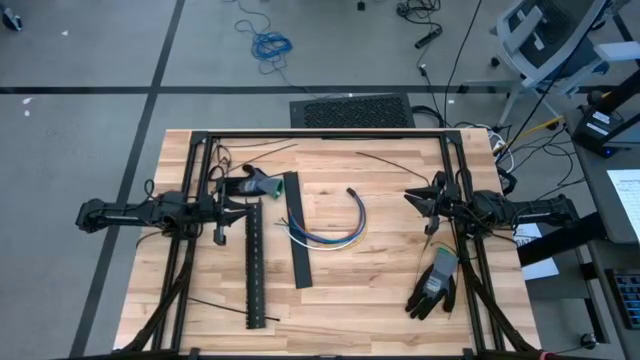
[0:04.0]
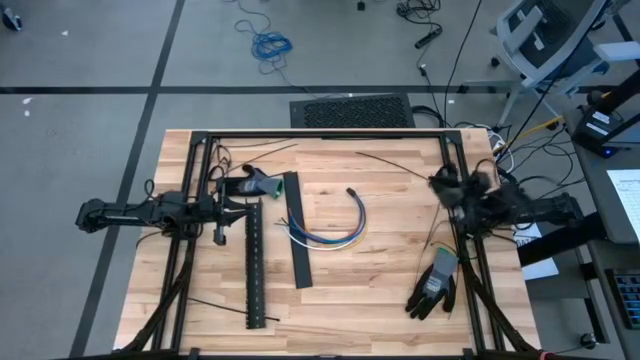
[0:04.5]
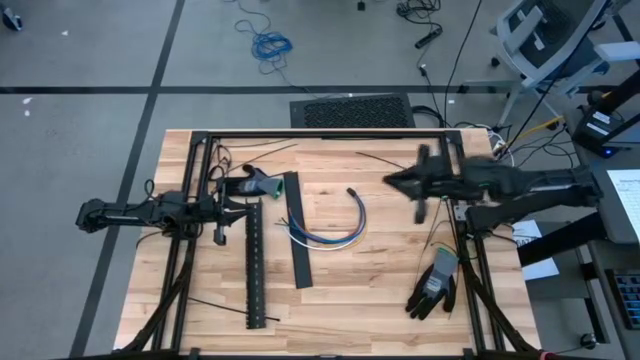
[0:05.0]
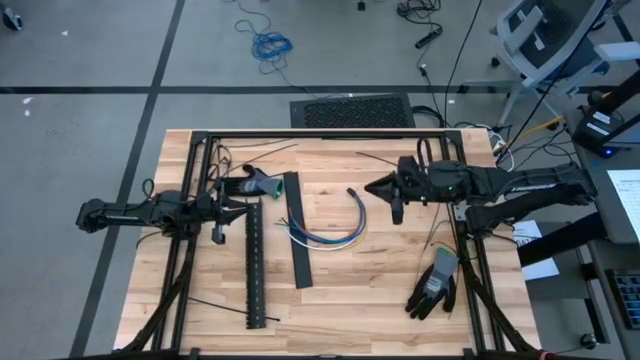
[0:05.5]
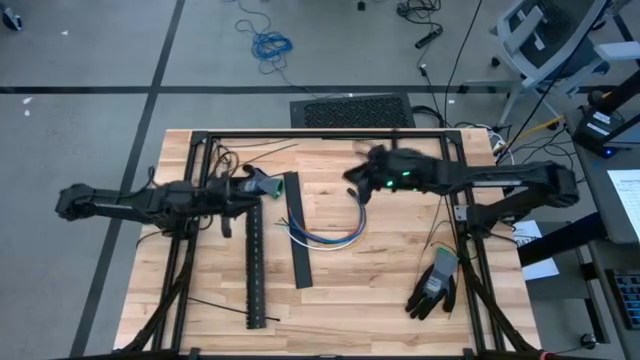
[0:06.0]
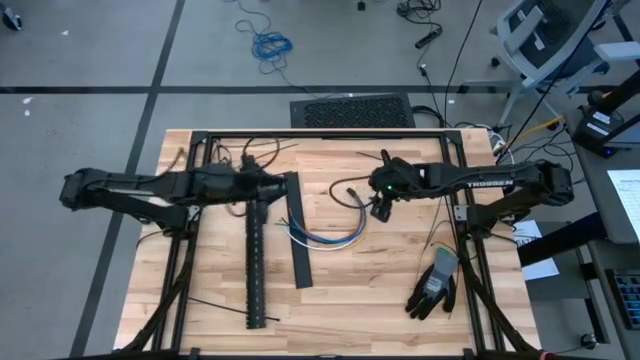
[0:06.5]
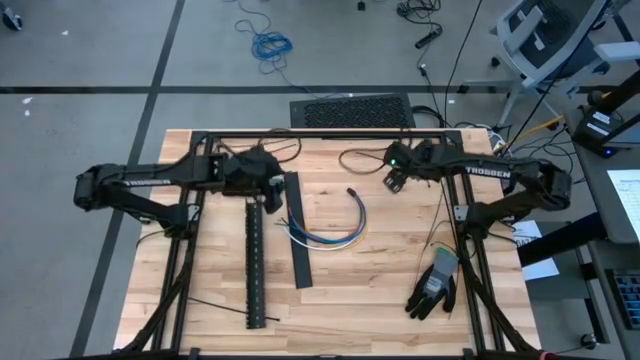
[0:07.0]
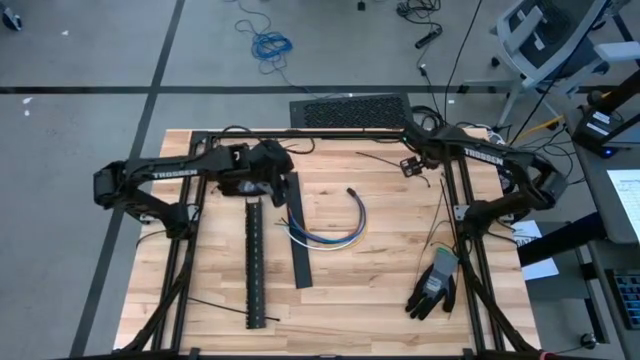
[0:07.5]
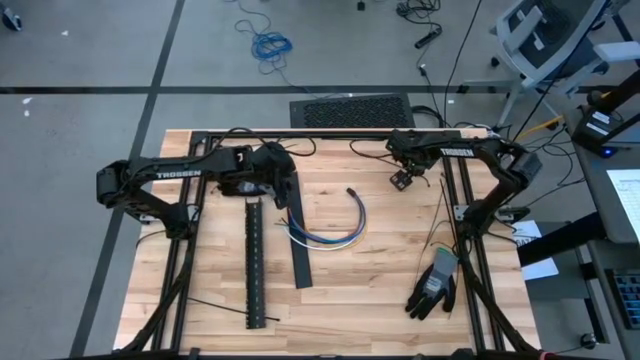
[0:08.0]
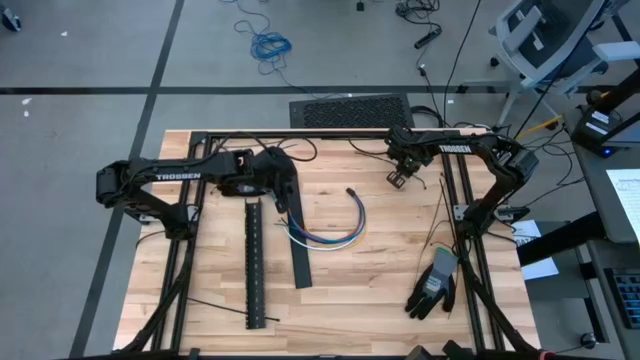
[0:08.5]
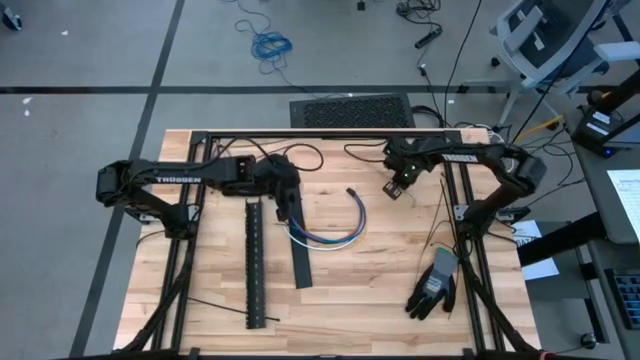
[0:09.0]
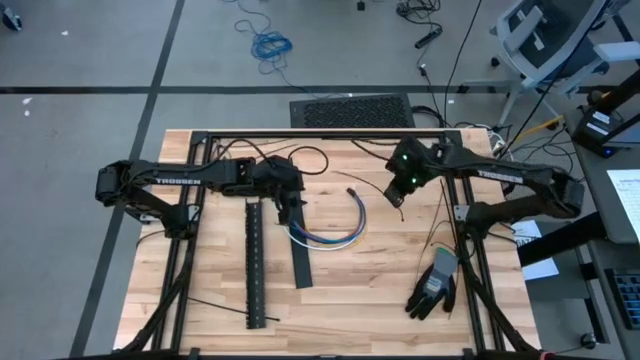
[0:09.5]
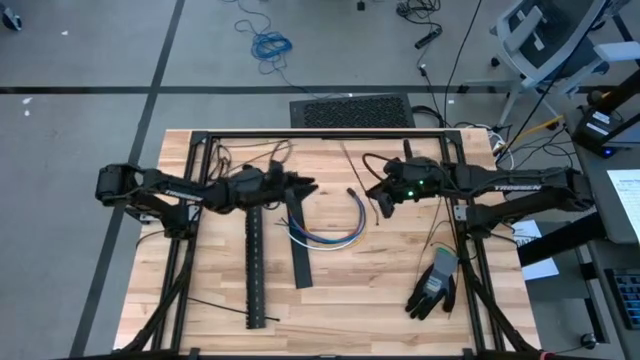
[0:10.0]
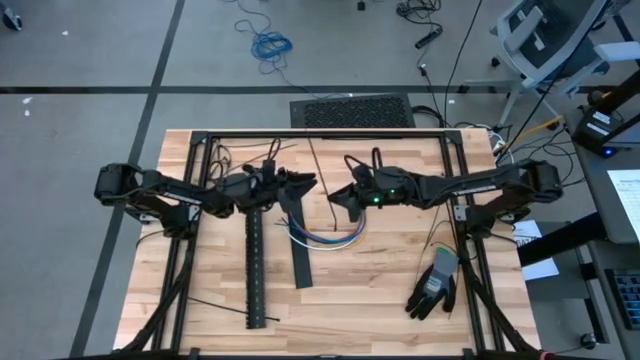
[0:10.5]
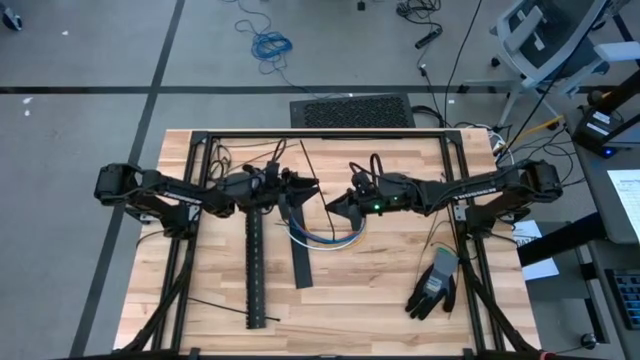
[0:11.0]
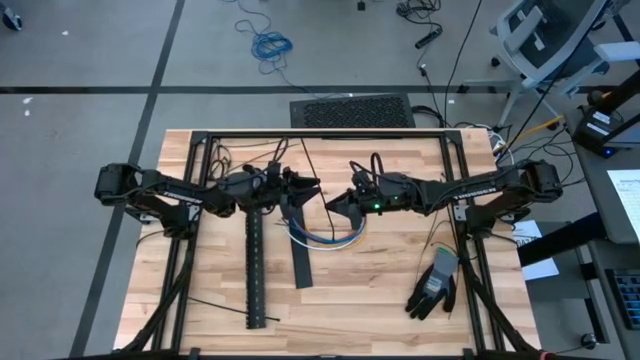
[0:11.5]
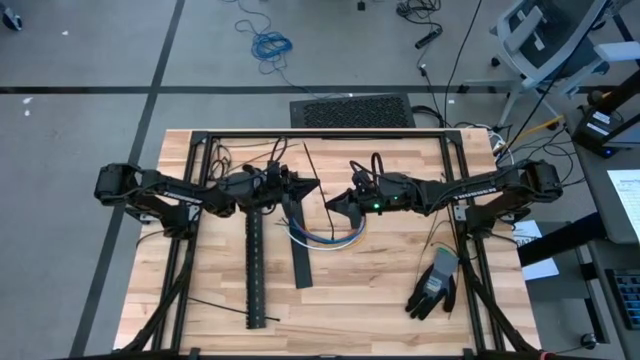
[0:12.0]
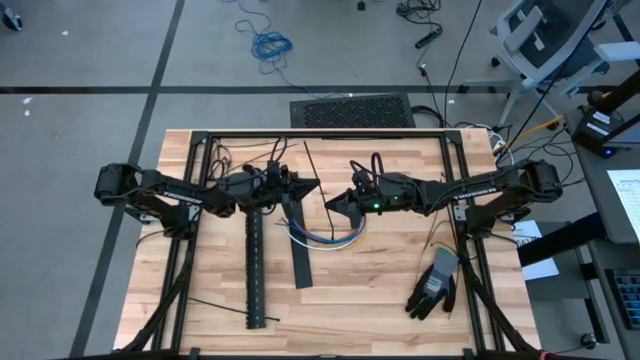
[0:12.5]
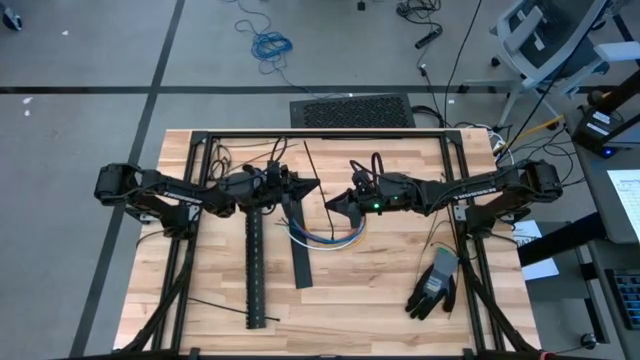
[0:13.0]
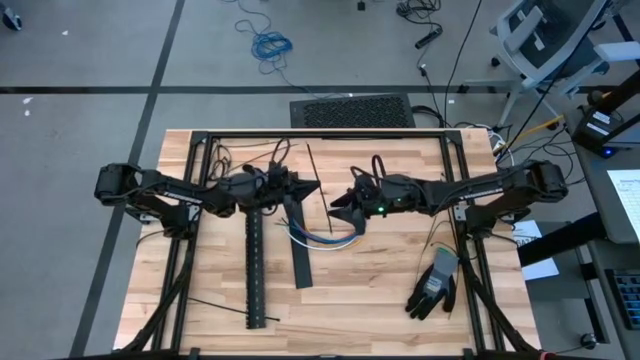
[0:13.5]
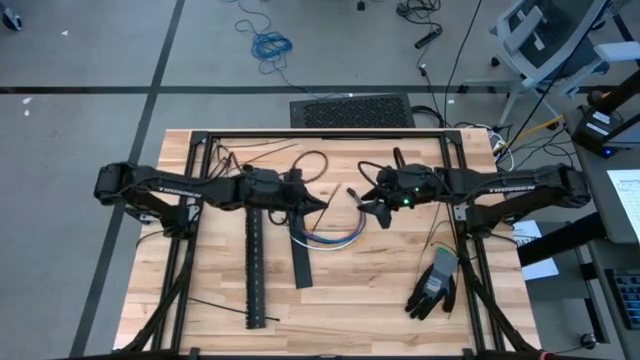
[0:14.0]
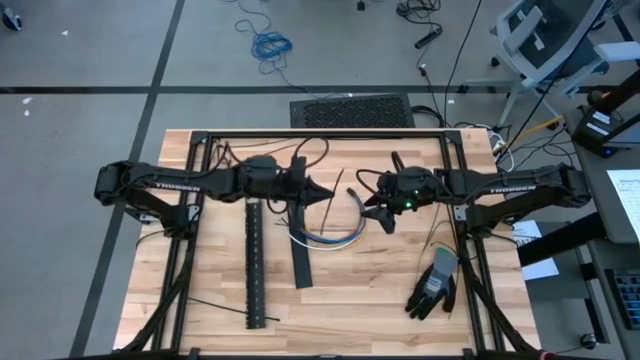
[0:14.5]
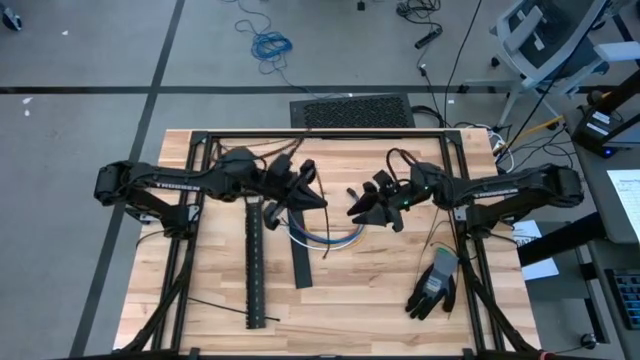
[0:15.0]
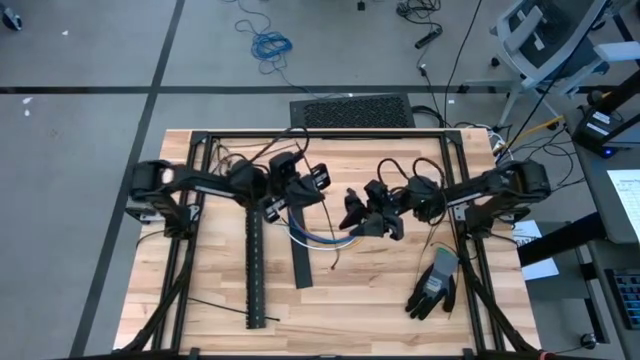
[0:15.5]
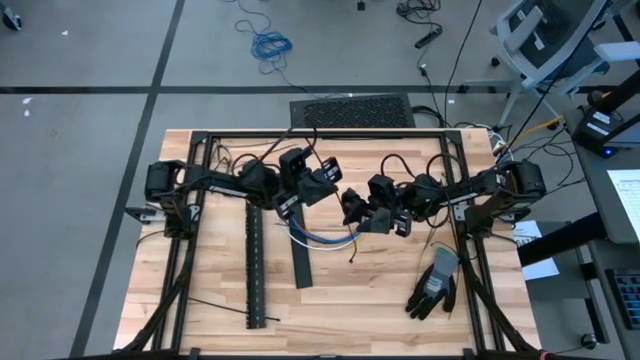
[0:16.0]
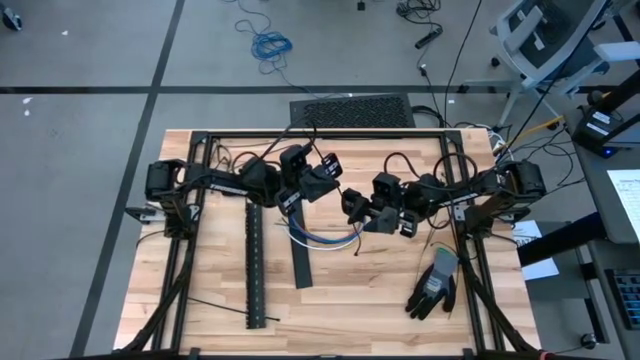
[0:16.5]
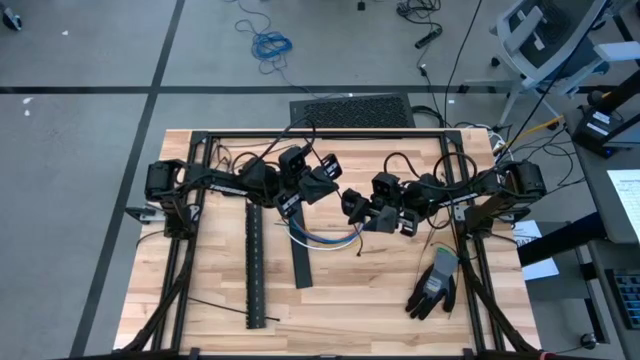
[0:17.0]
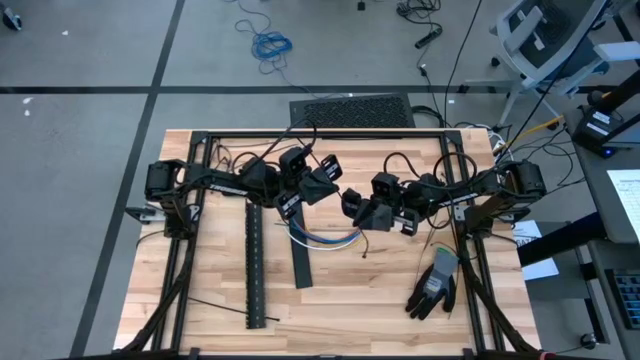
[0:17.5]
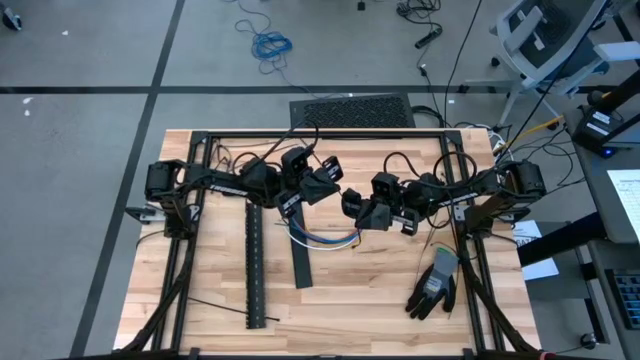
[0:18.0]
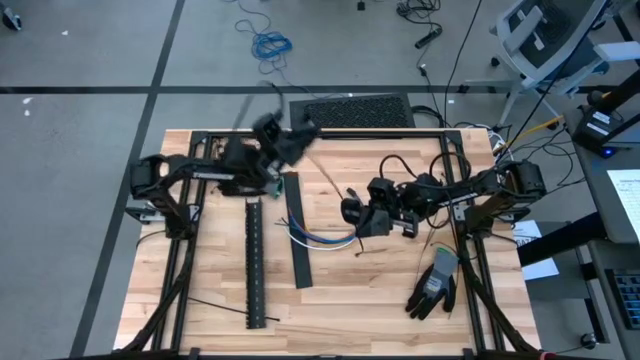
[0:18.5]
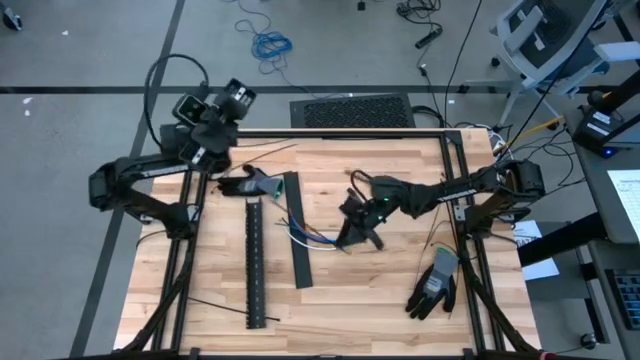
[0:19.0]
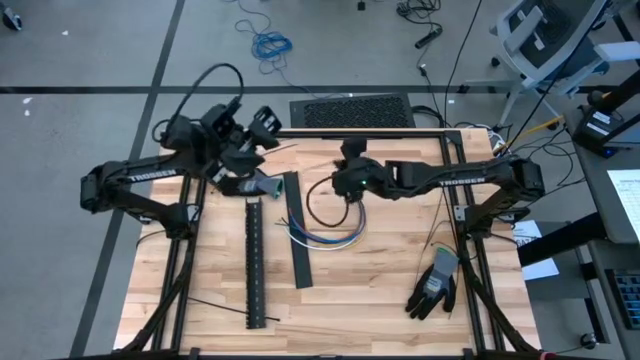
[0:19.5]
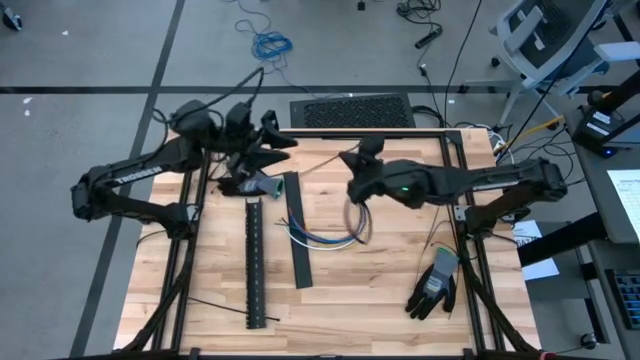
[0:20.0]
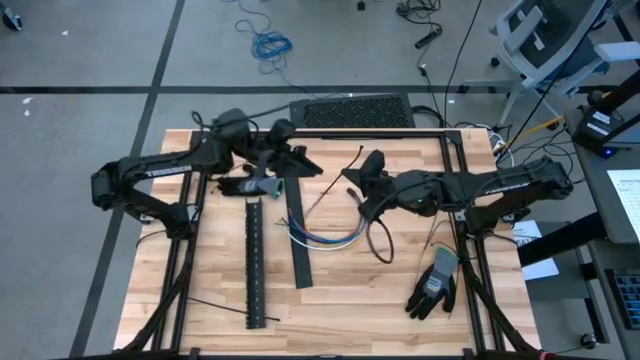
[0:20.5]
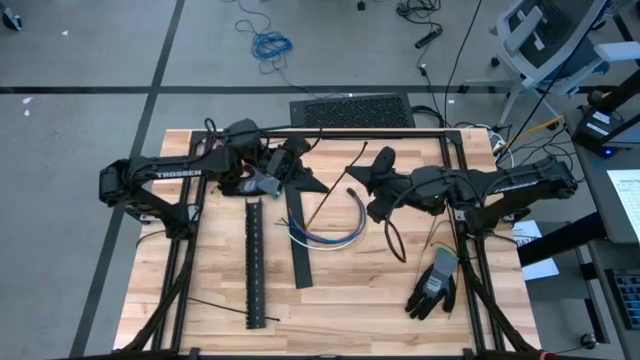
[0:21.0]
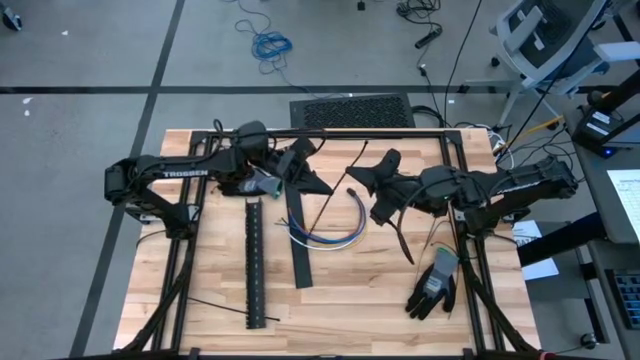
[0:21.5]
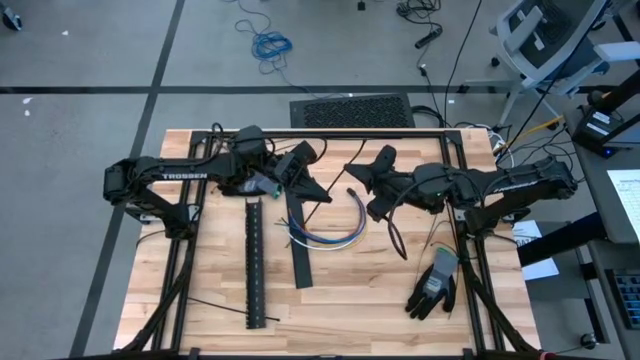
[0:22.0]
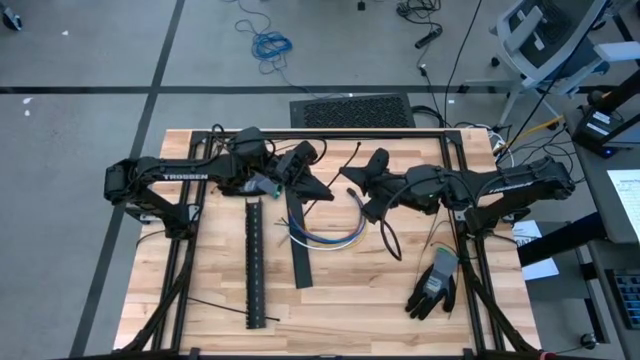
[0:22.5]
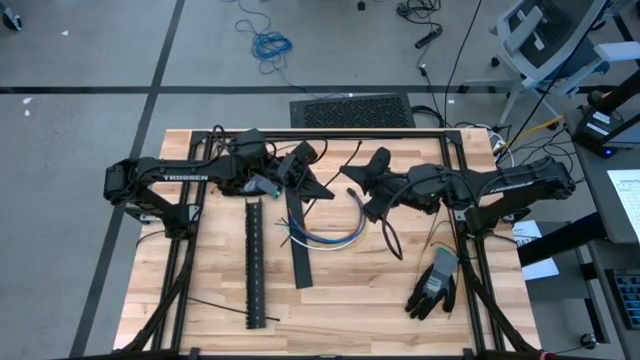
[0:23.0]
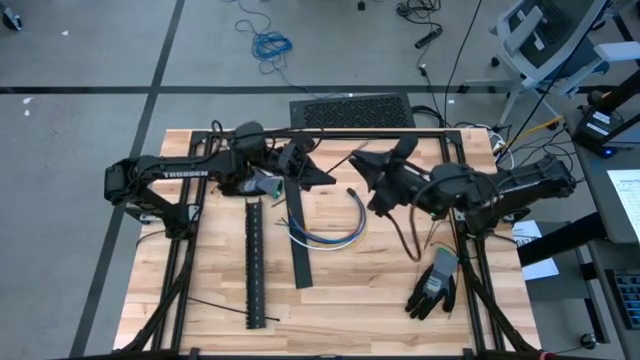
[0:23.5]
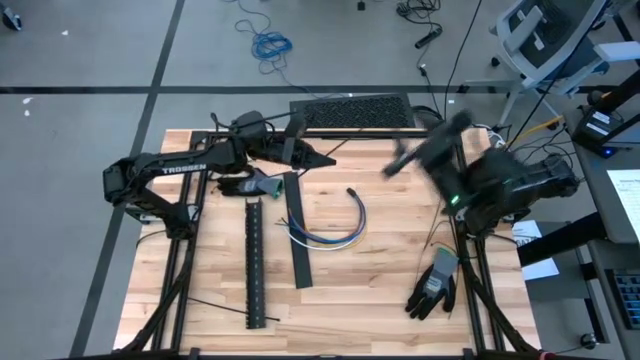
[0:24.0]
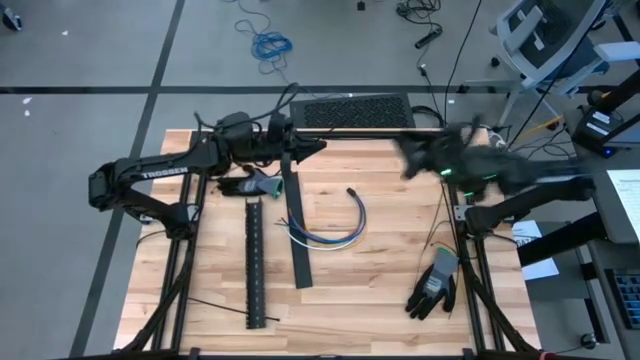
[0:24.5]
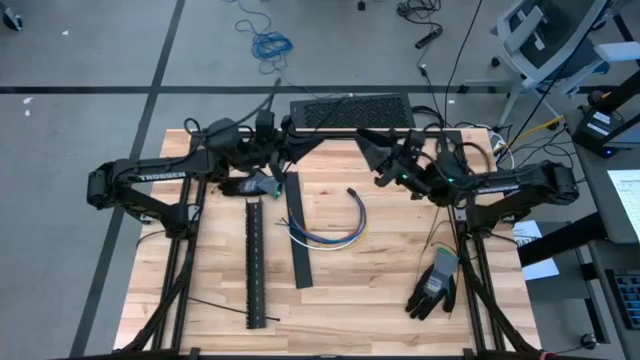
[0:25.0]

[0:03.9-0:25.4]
Task: Ziptie cables
Wrap the cable wires with a black zip tie
